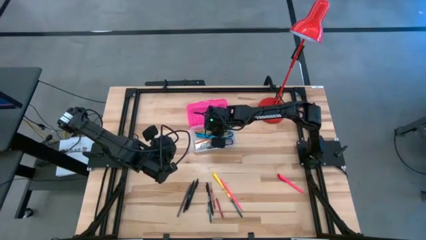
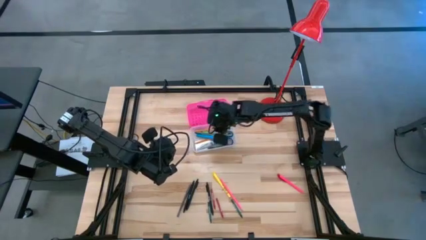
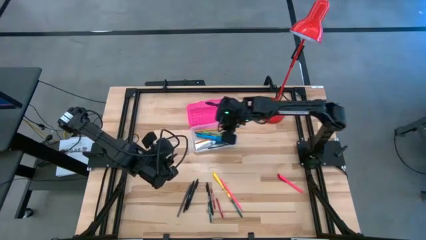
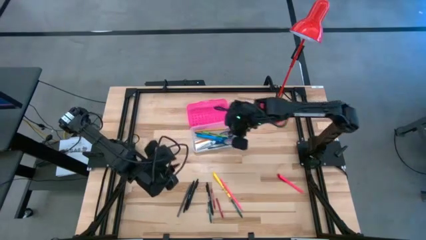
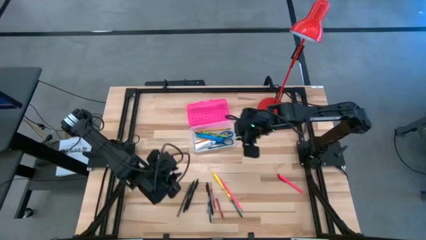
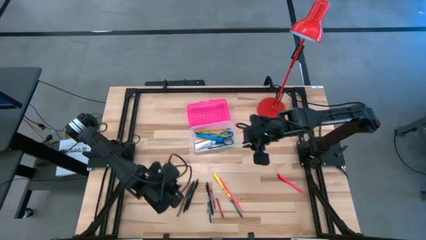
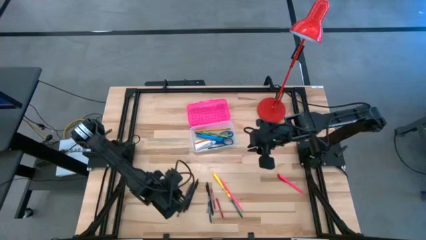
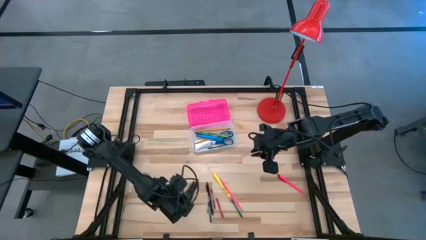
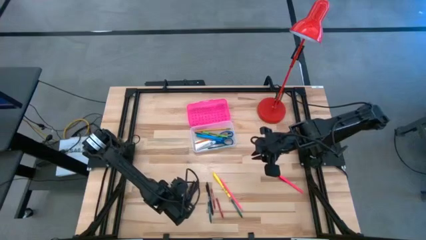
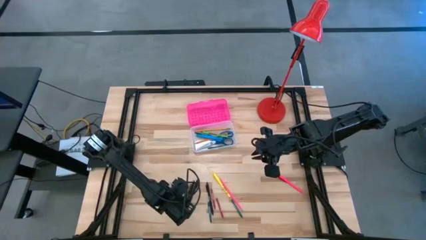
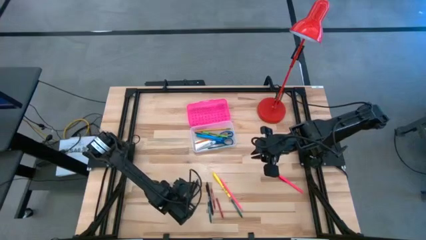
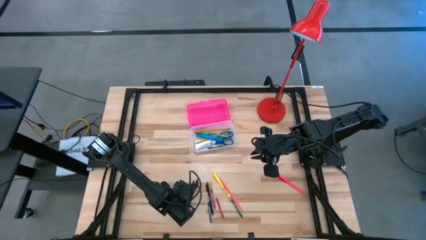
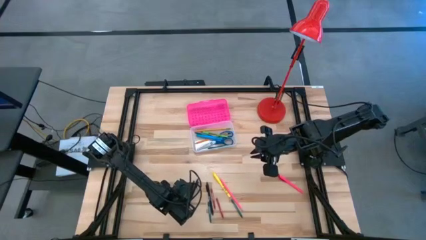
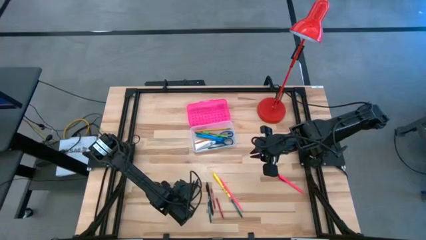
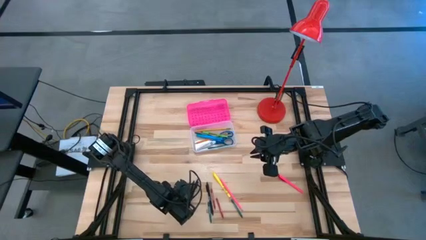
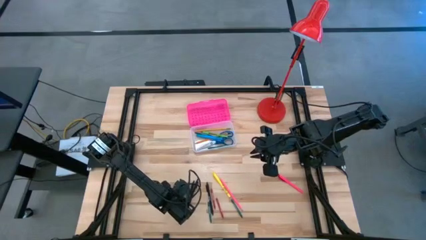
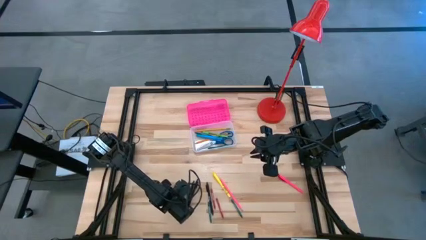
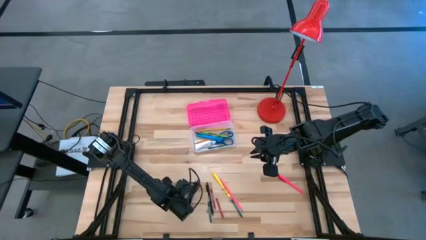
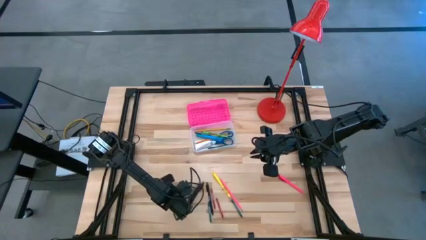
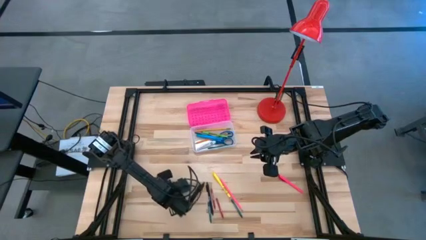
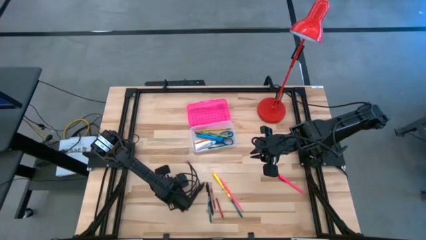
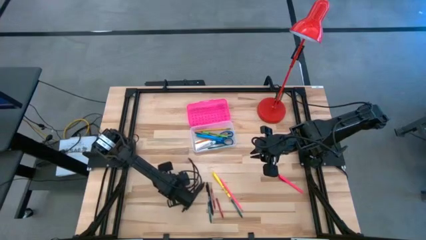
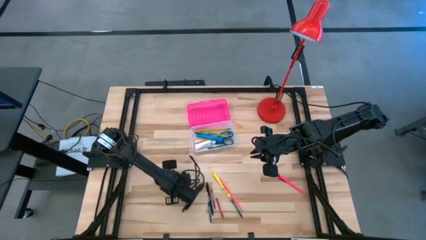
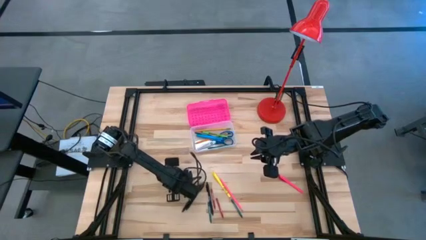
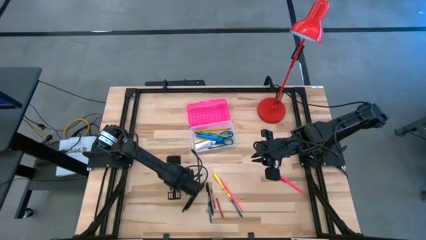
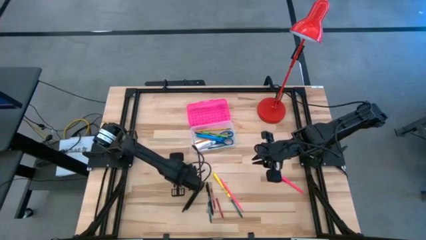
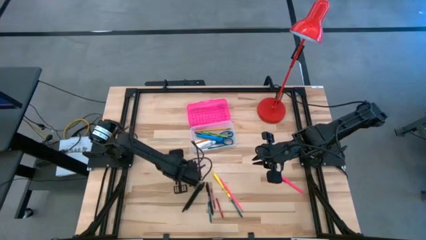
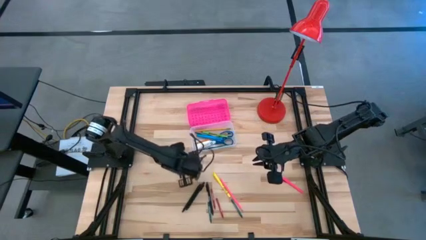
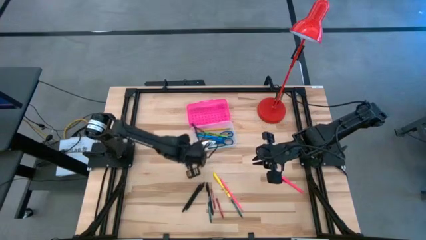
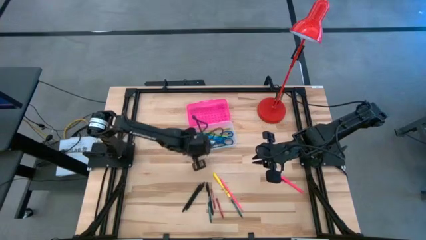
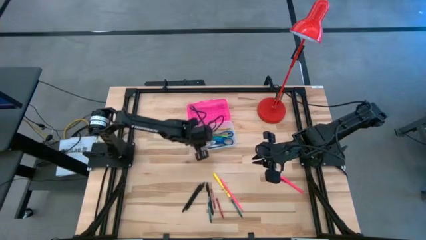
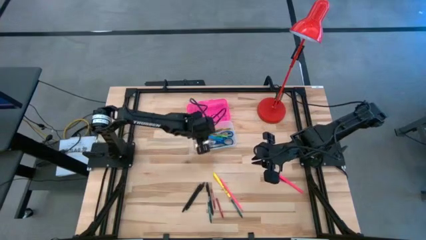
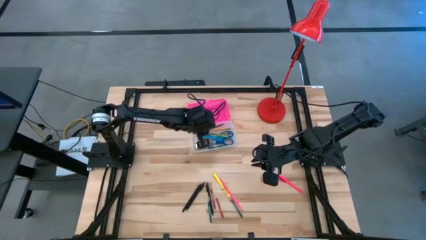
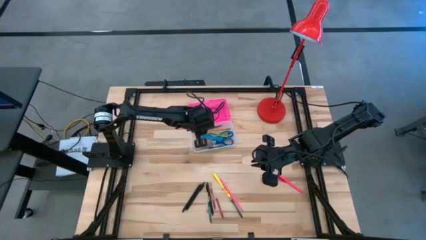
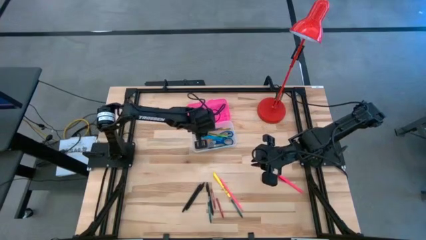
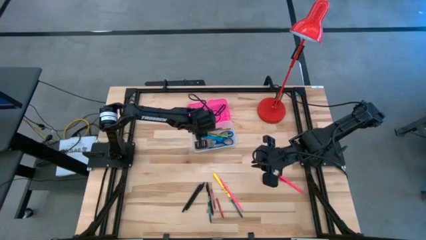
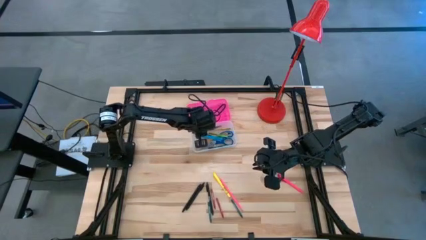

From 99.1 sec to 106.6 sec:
Task: Pick & place school supplies into a supply box
Put the gray pen into the pink supply box

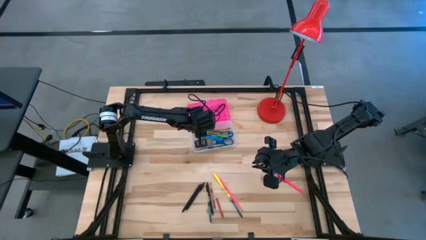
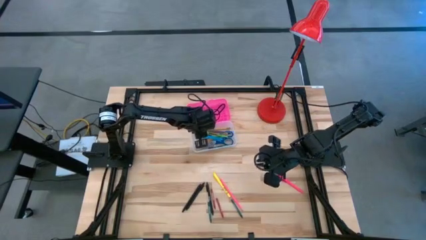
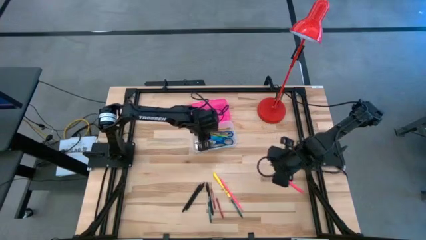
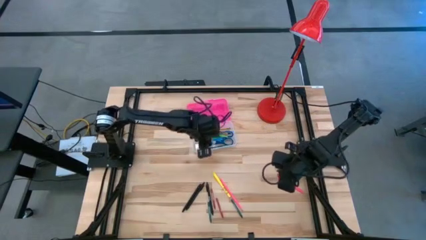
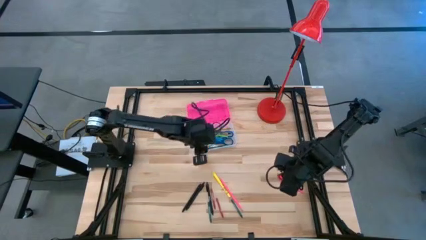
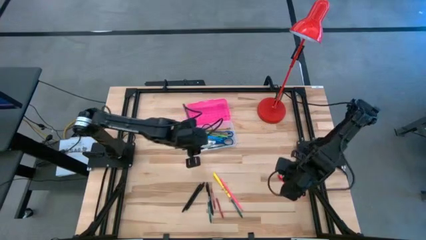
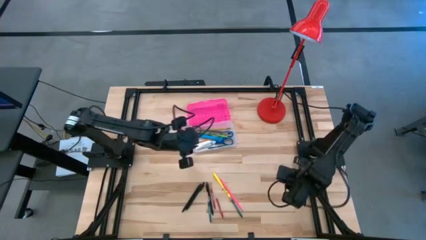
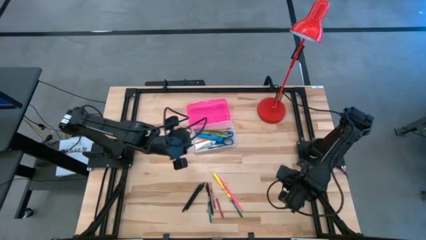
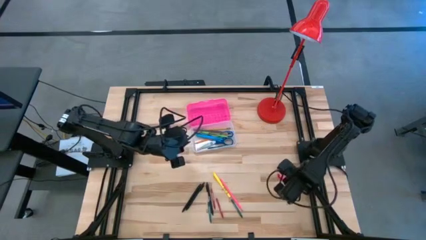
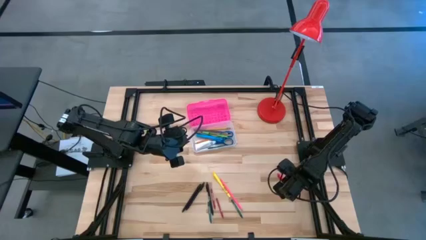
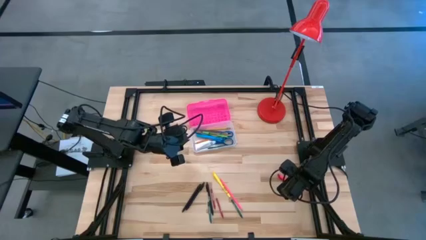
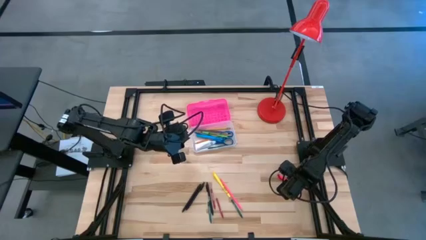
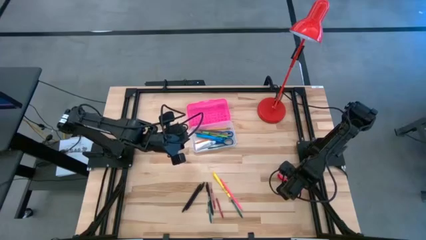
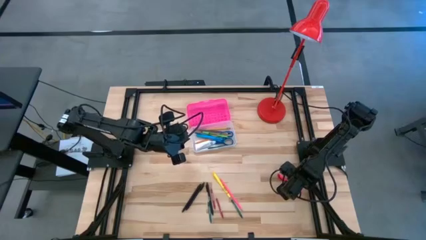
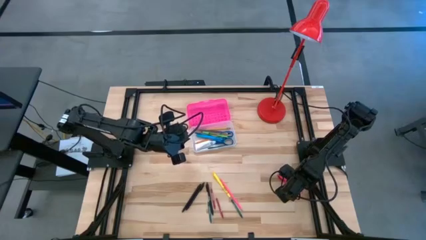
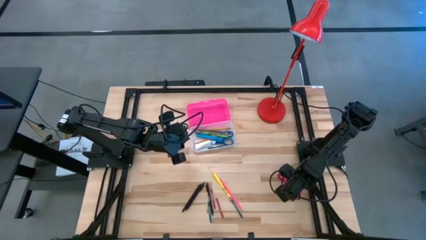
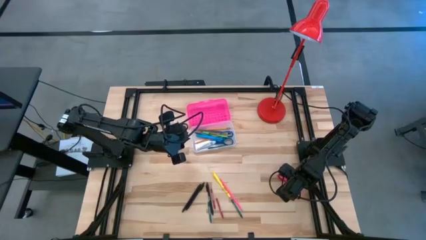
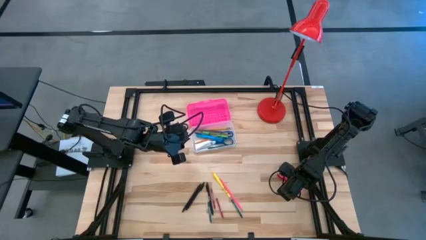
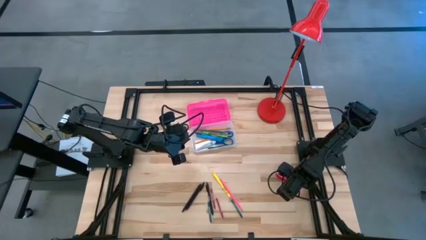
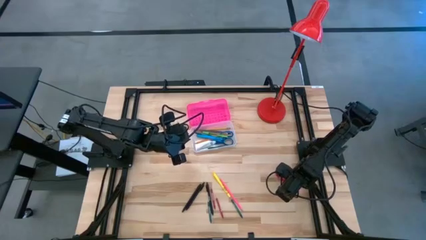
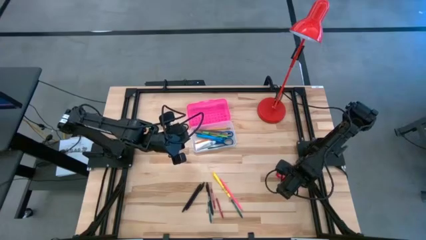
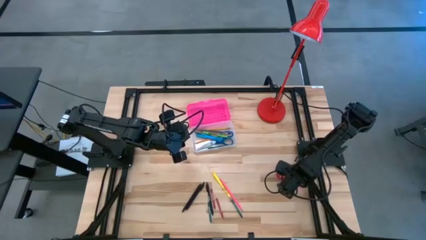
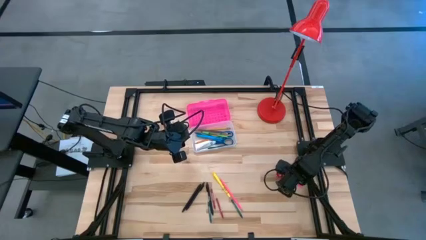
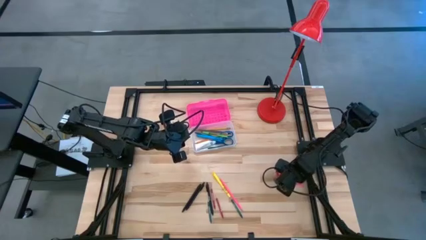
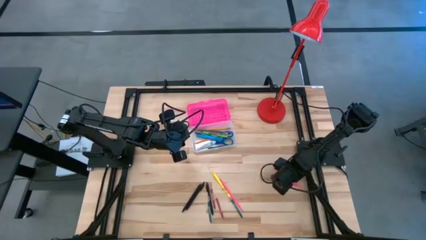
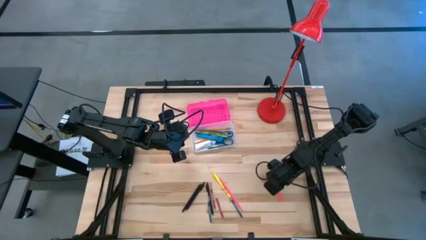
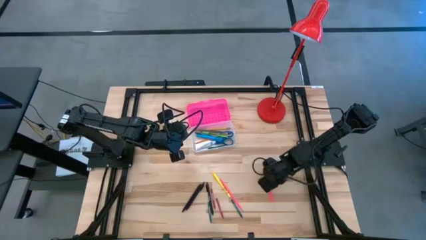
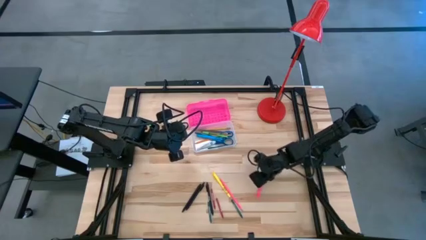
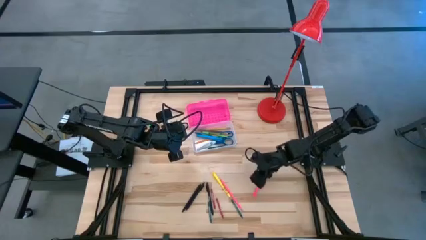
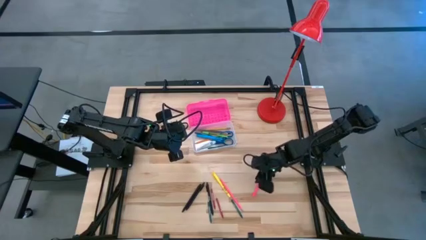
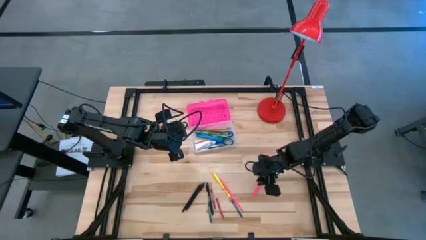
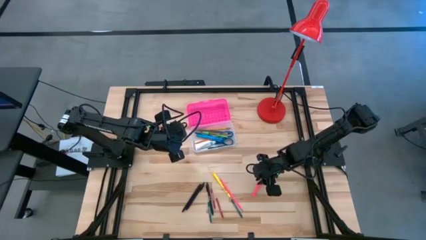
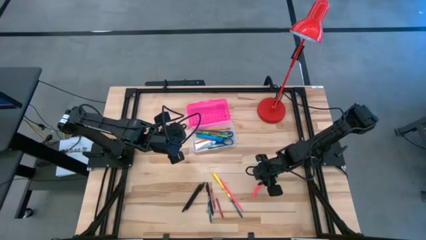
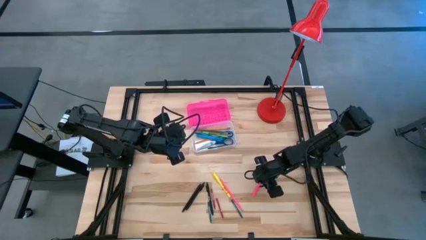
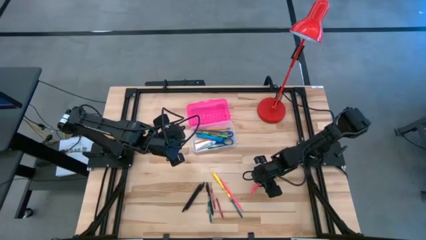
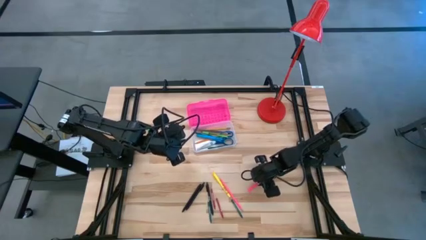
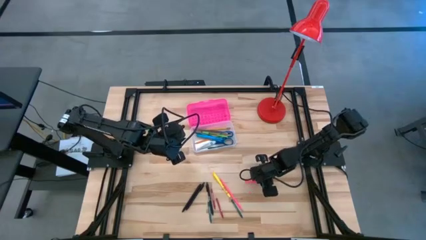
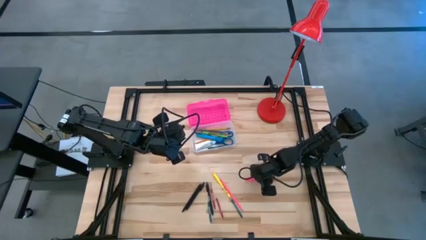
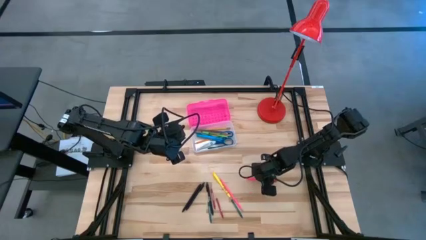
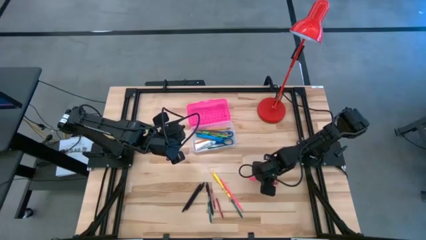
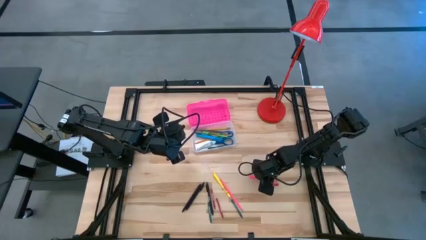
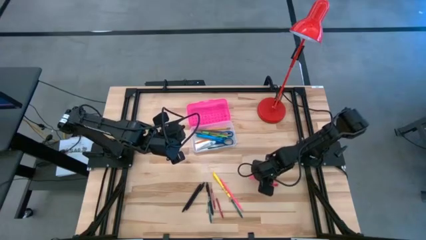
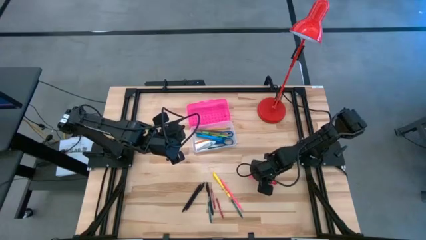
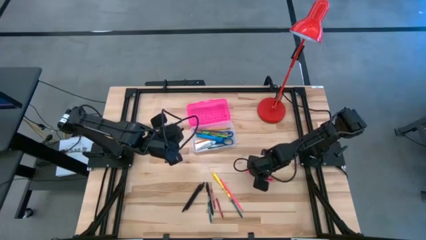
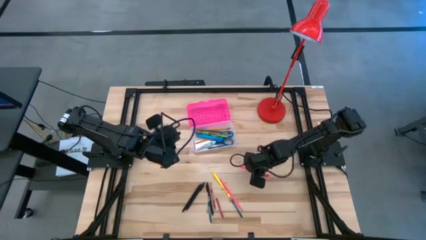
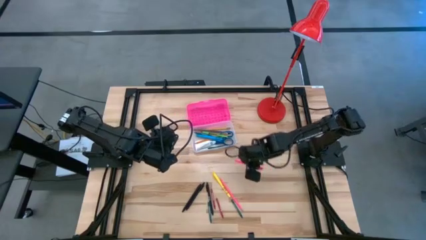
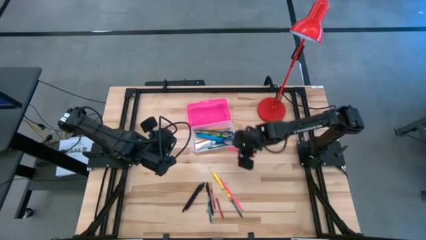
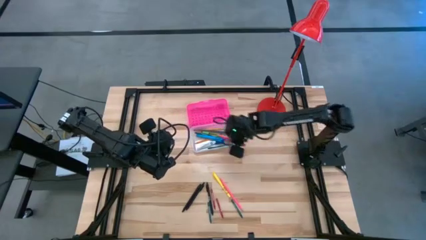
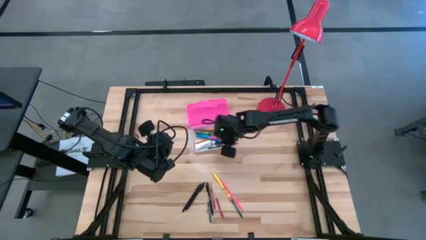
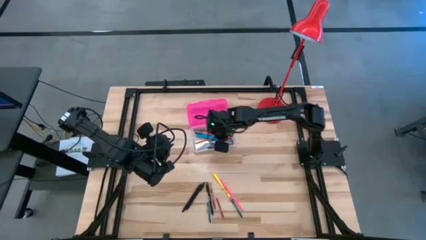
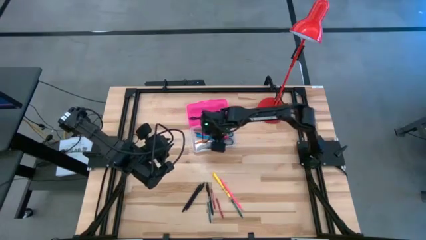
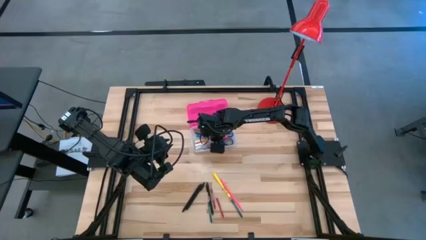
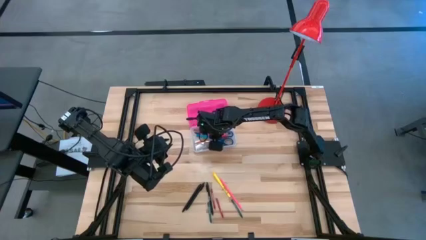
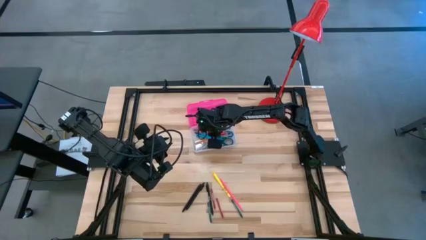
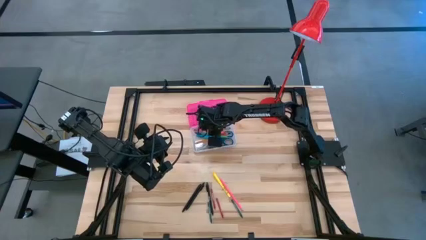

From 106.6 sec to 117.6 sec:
Put the pink pen into the pink supply box
